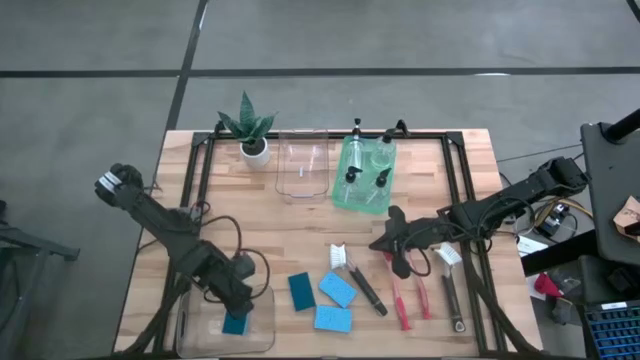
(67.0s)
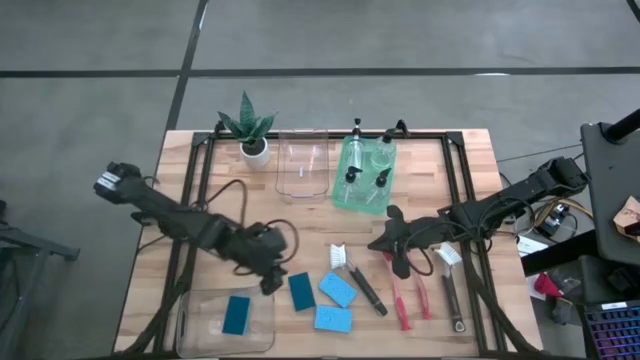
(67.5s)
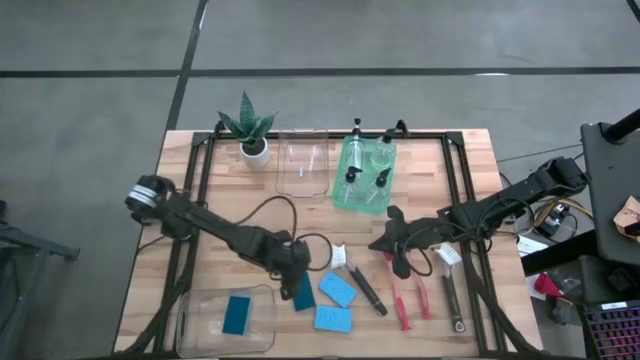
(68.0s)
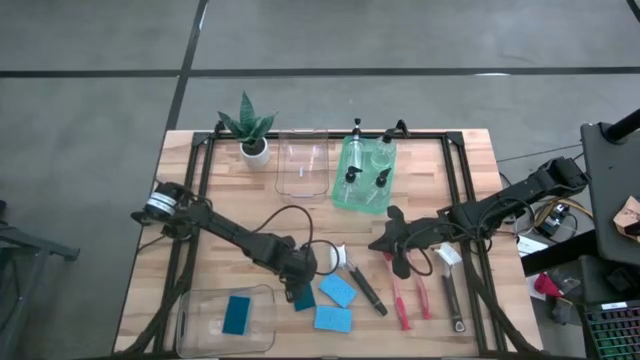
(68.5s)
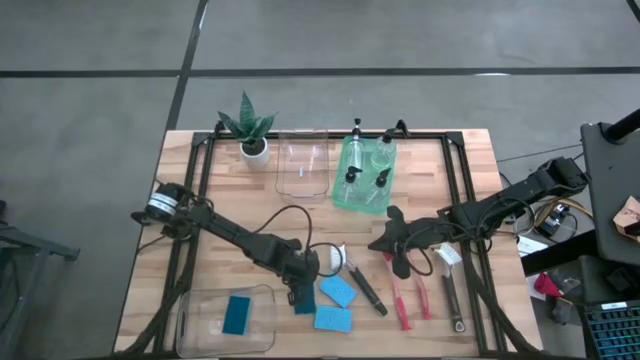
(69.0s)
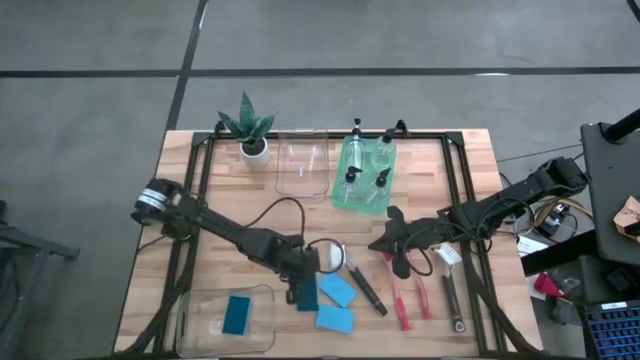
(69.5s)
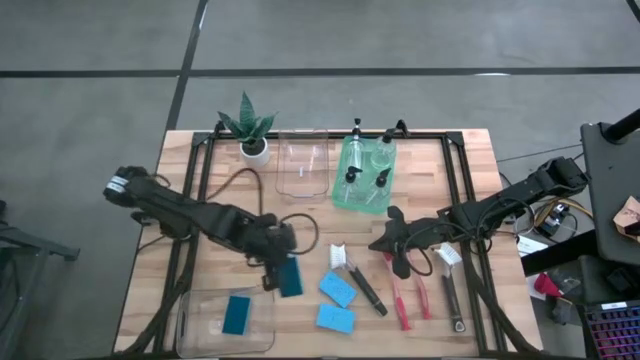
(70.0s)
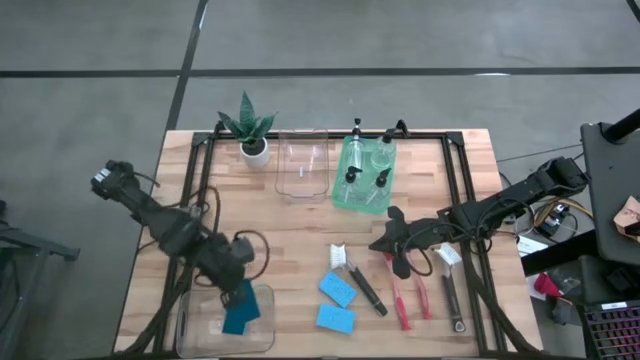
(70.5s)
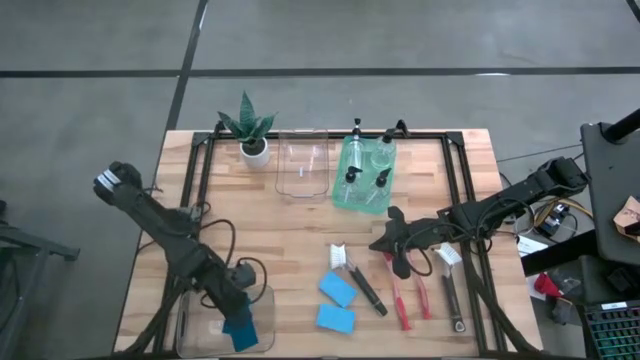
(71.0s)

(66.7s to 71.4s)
Task: Pick & Place Kitchen Sink Supplies
Put the blue sponge into the bottom transparent bin

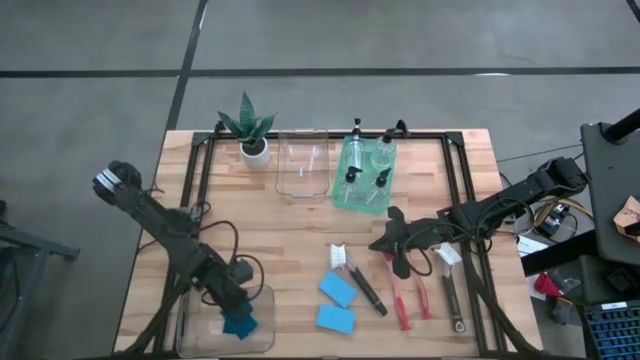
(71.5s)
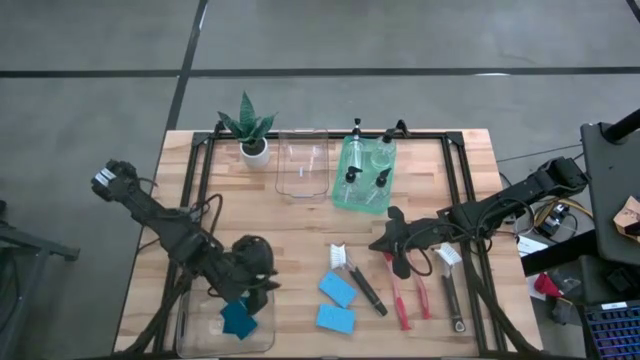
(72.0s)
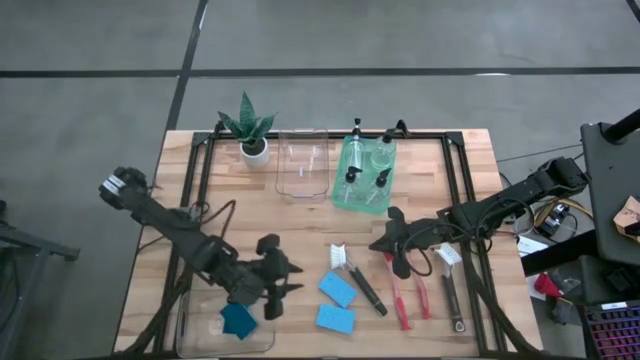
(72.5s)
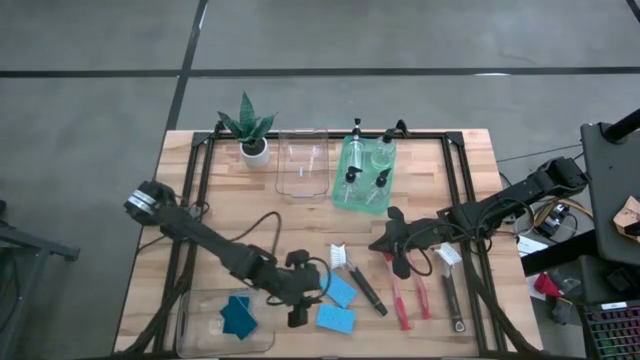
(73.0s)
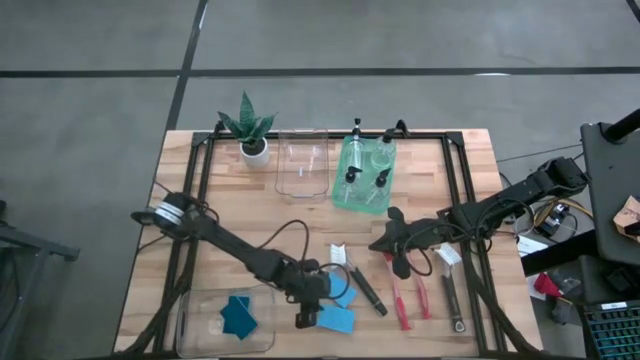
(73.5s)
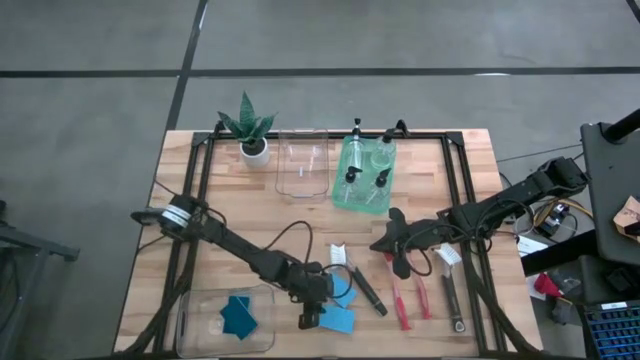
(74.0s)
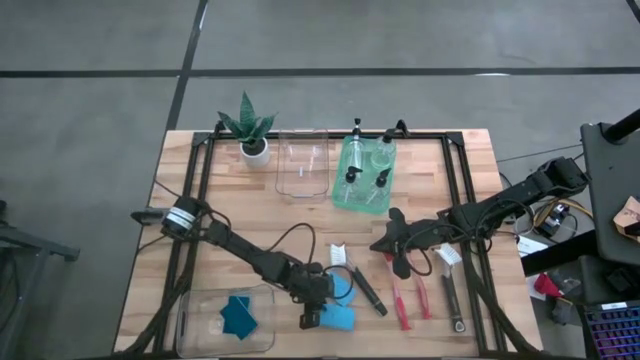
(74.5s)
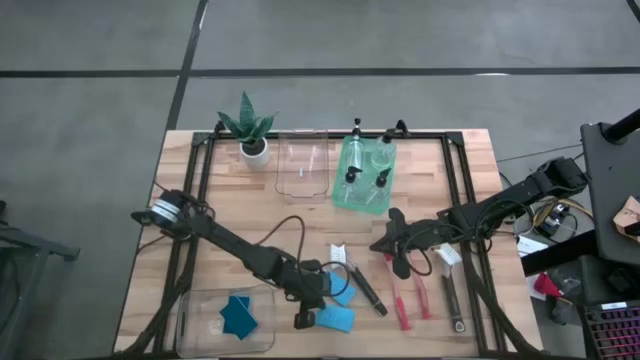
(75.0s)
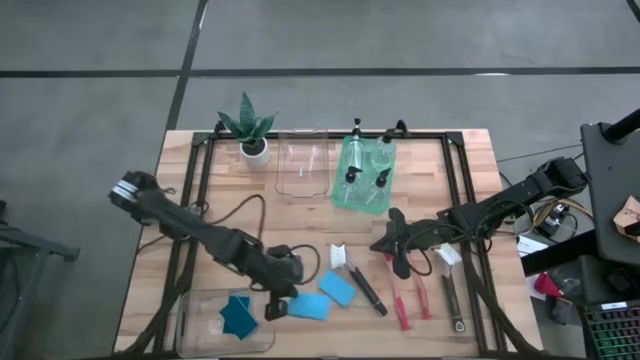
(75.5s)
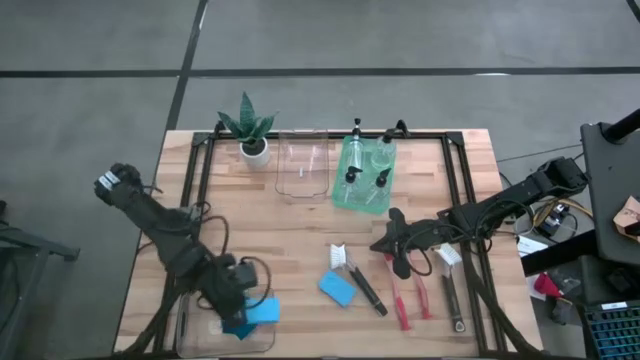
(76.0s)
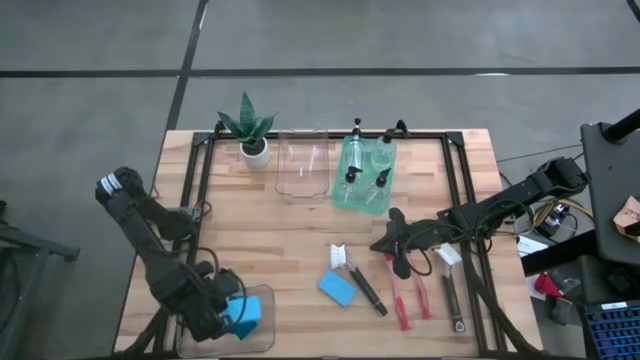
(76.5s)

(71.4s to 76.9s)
Put the blue sponge into the bottom transparent bin

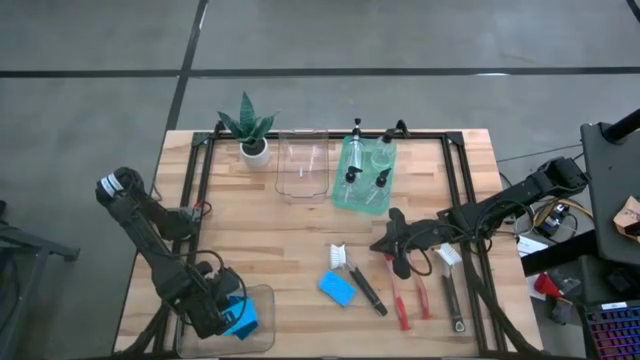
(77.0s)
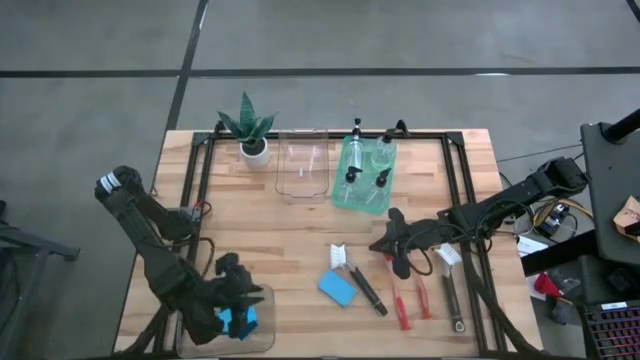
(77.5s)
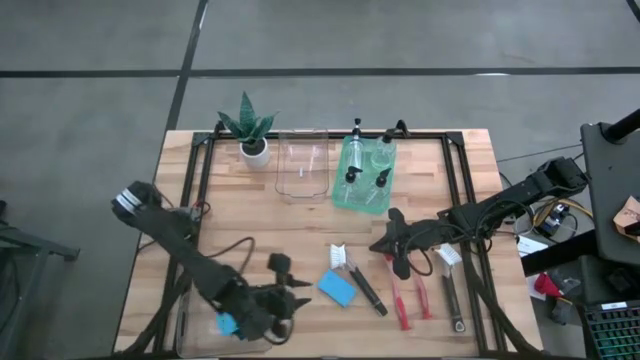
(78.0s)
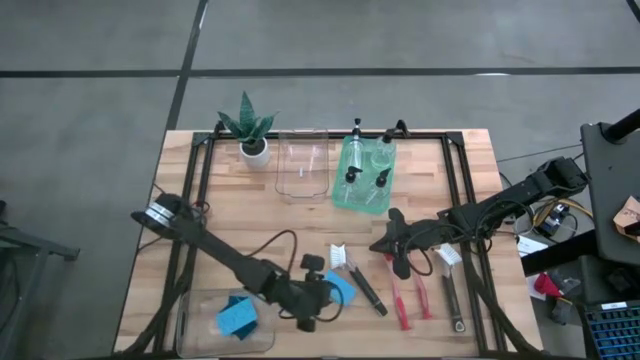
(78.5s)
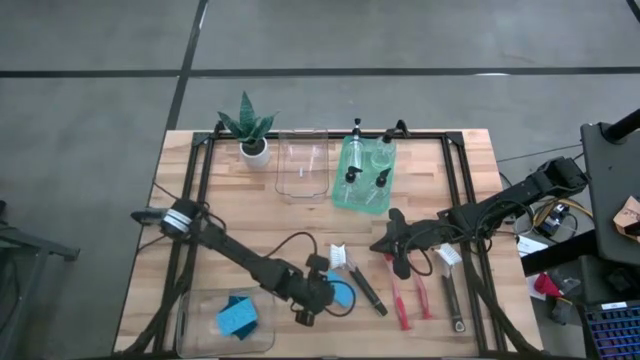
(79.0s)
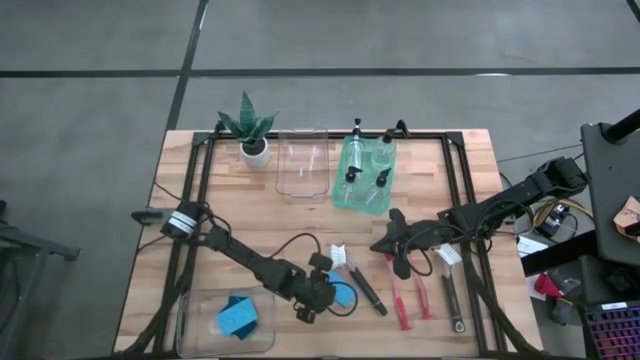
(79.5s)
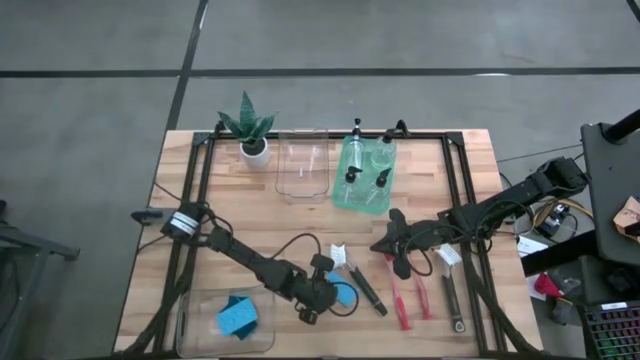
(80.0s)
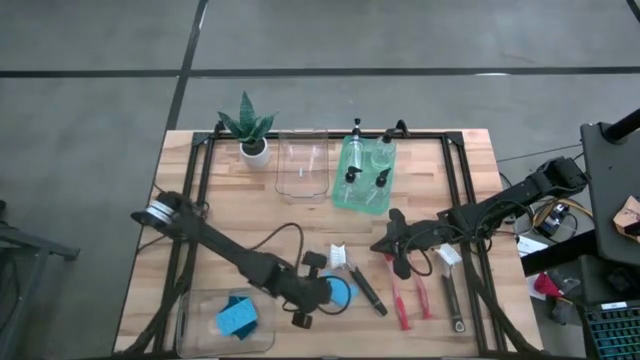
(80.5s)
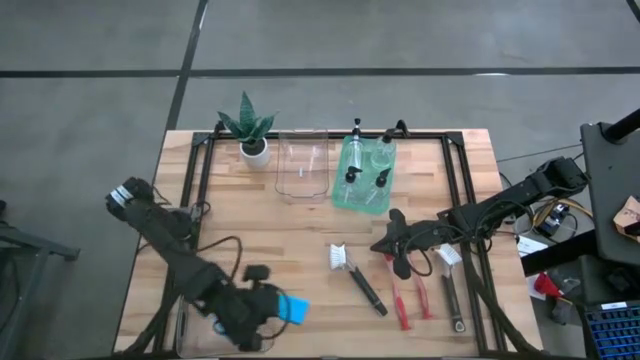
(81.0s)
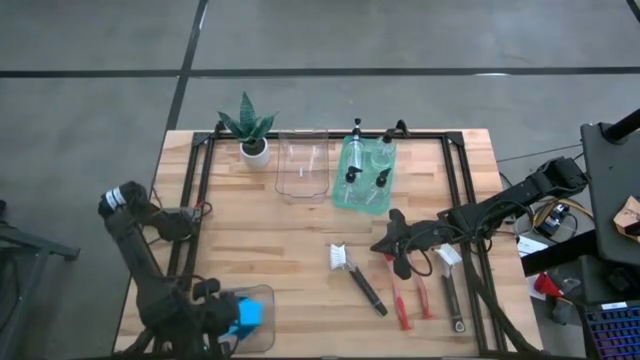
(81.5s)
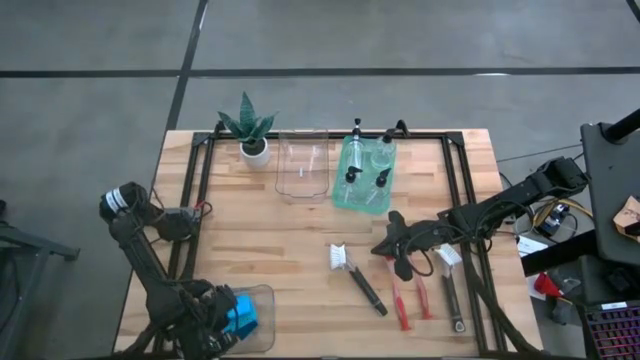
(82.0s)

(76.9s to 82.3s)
Put the blue sponge into the bottom transparent bin

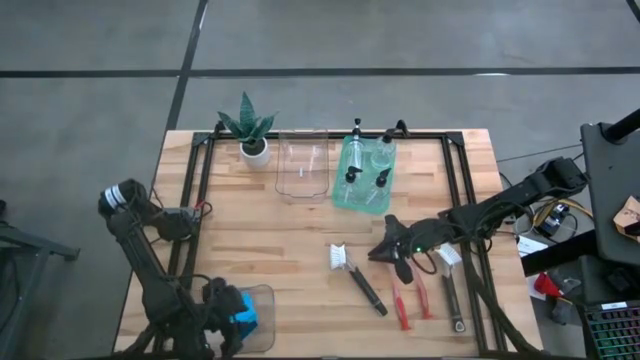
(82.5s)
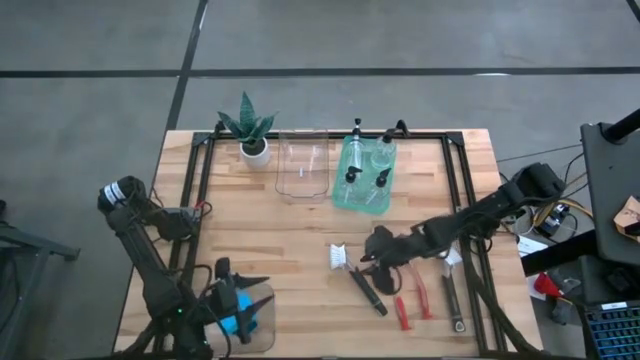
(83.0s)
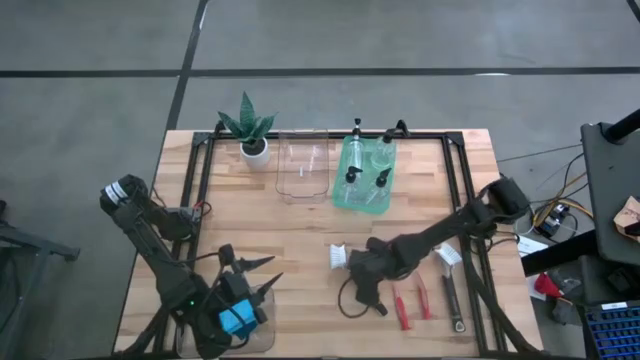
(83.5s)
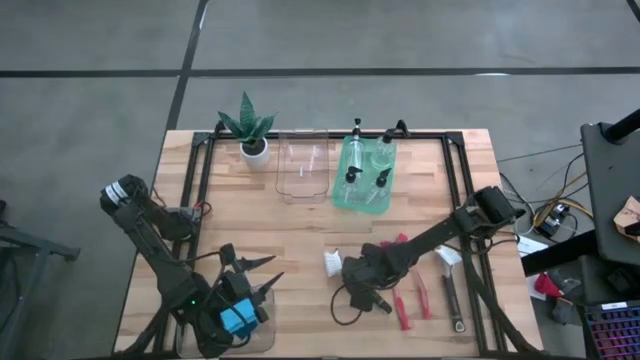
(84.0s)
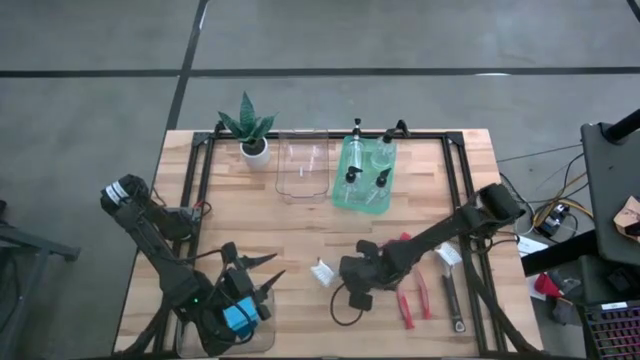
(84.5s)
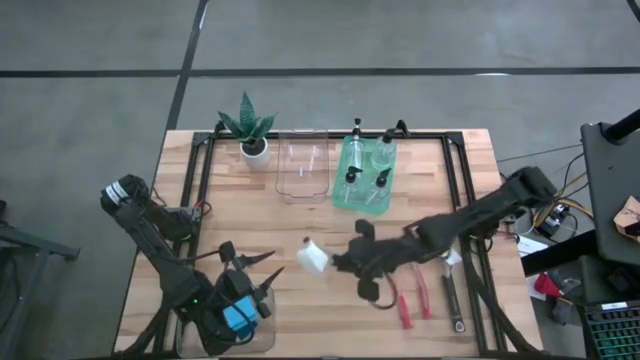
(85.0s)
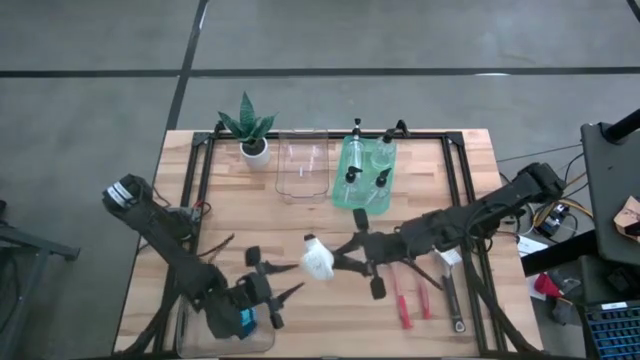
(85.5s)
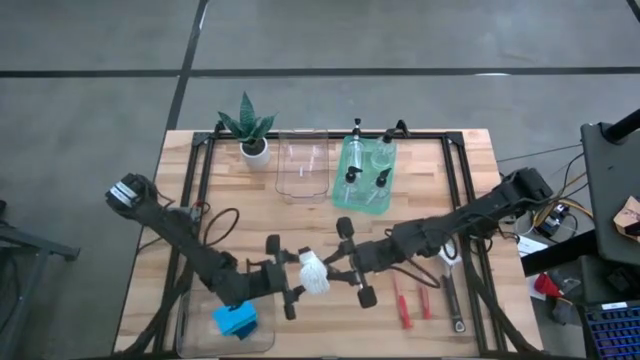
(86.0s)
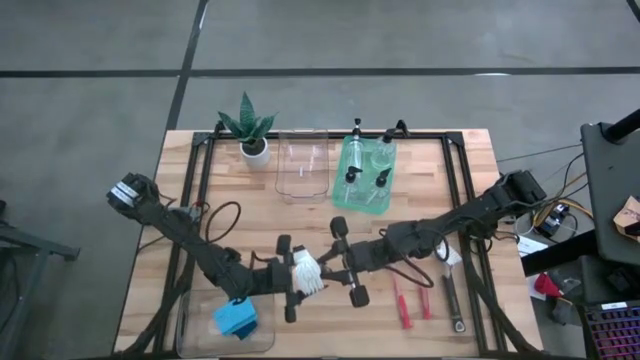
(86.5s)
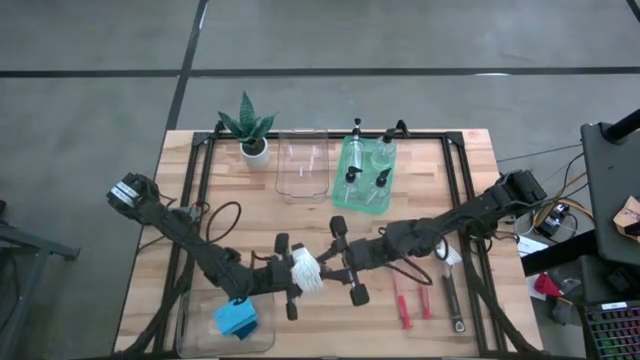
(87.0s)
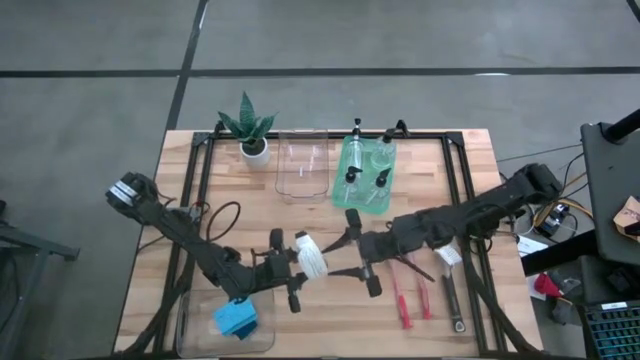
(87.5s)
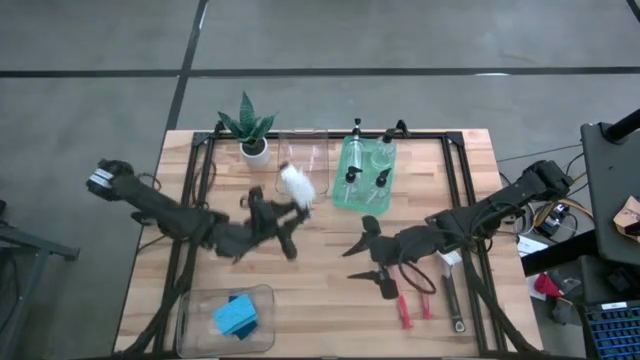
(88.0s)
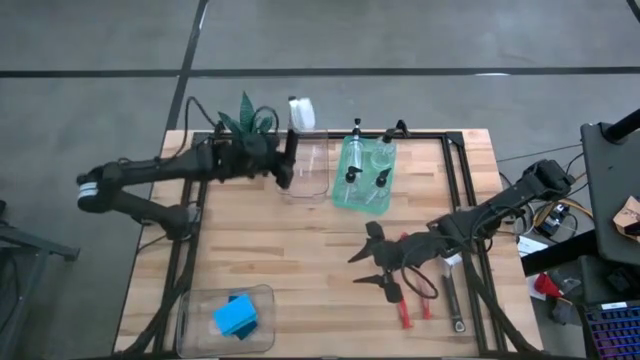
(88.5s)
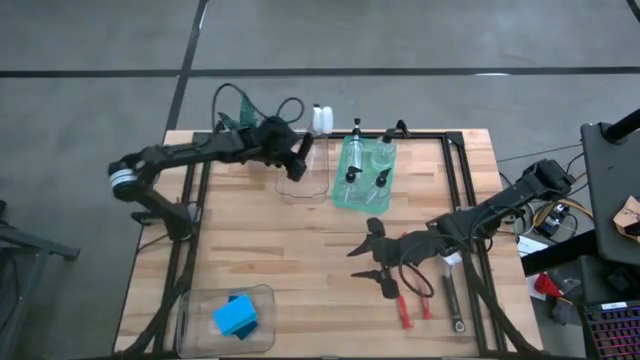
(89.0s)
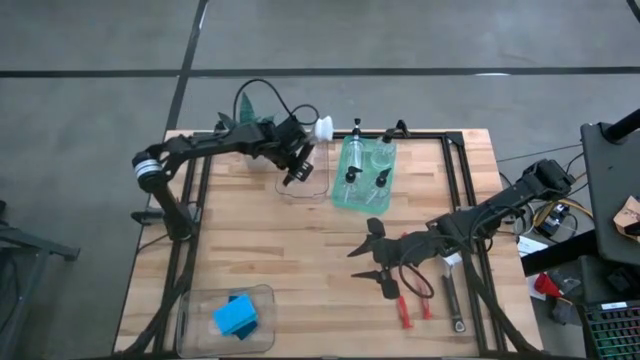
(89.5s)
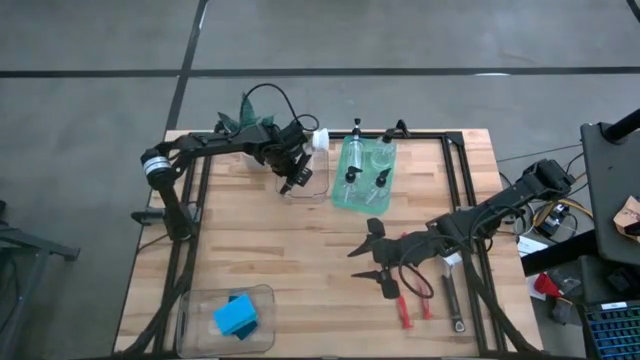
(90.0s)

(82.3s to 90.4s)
Put the black dish brush into the top transparent bin
